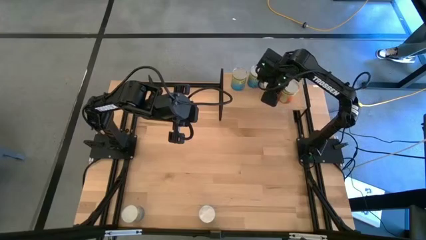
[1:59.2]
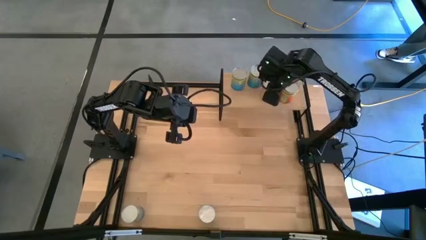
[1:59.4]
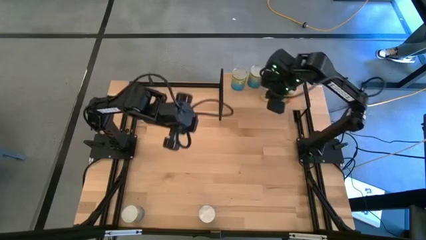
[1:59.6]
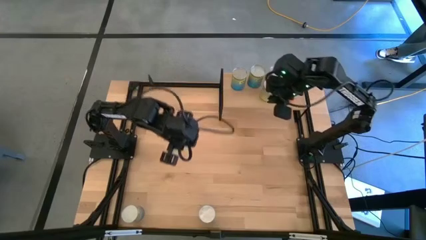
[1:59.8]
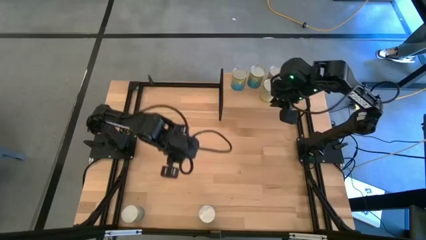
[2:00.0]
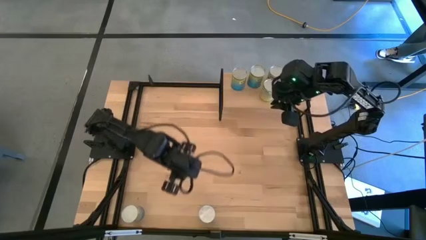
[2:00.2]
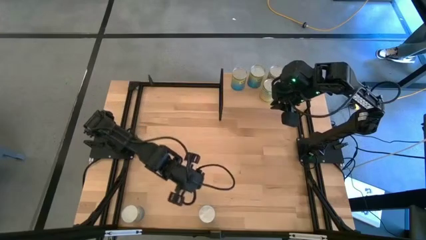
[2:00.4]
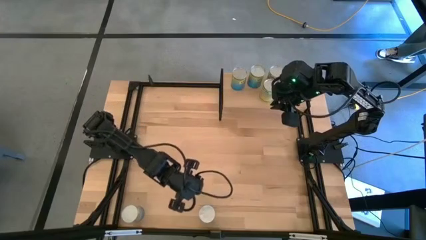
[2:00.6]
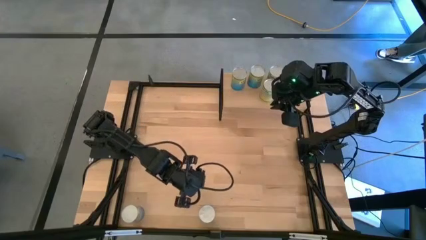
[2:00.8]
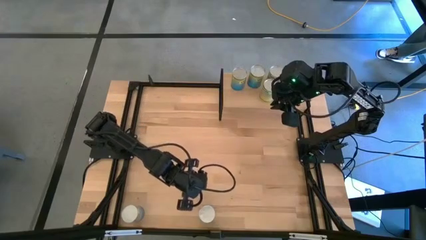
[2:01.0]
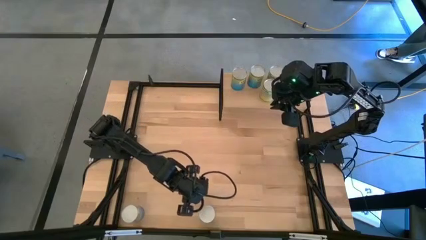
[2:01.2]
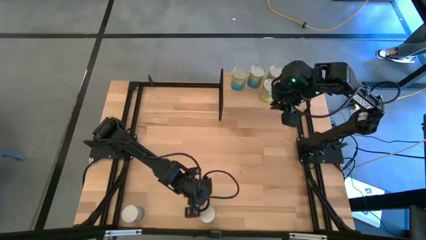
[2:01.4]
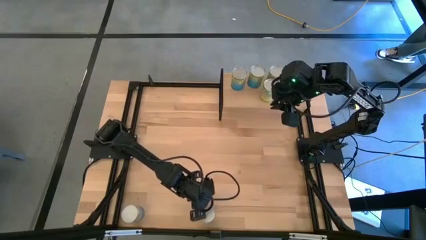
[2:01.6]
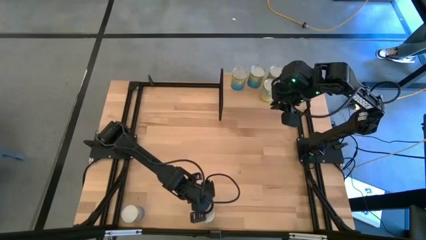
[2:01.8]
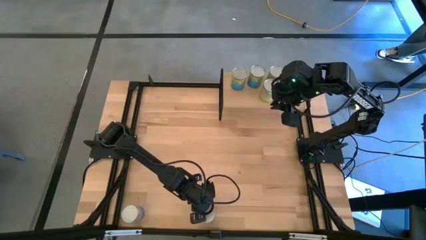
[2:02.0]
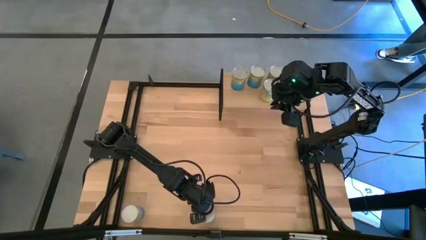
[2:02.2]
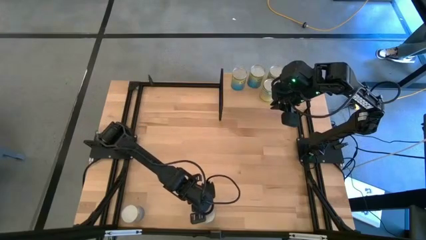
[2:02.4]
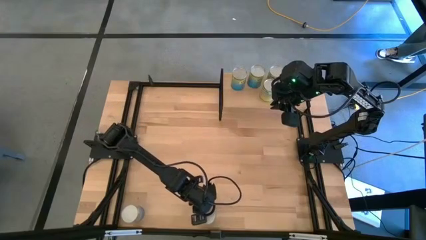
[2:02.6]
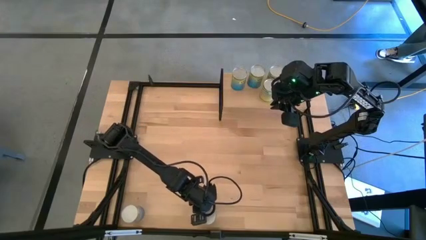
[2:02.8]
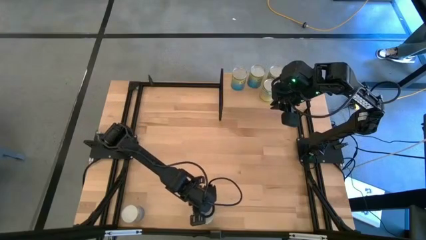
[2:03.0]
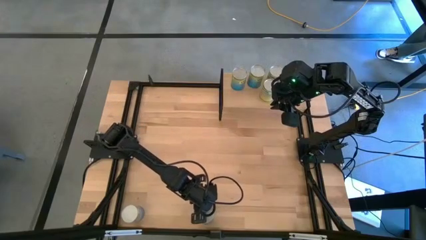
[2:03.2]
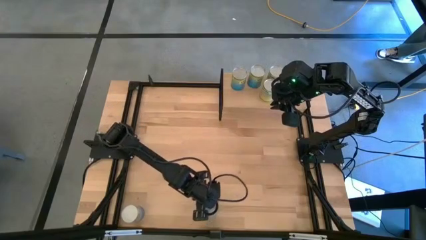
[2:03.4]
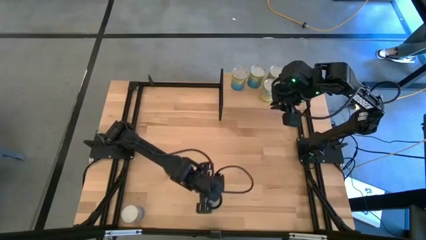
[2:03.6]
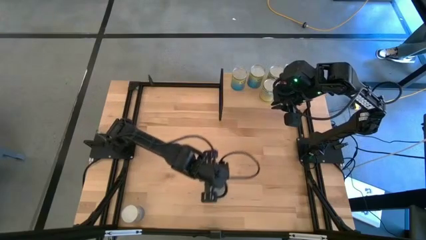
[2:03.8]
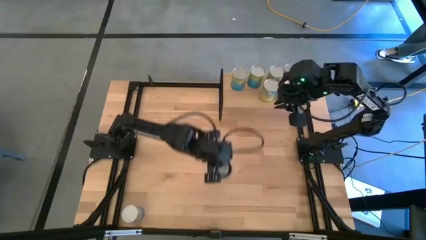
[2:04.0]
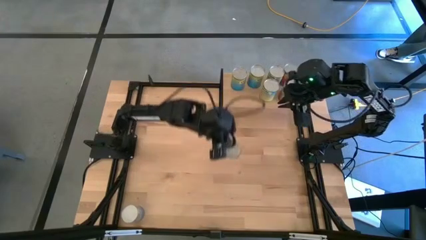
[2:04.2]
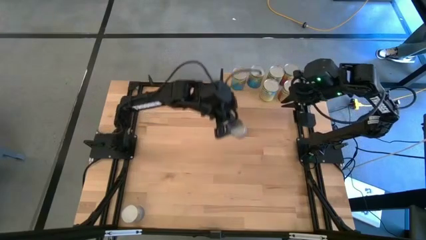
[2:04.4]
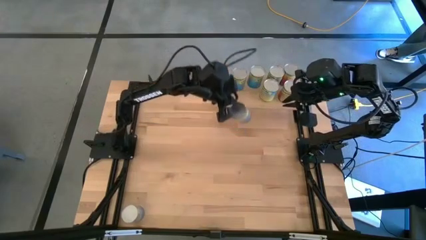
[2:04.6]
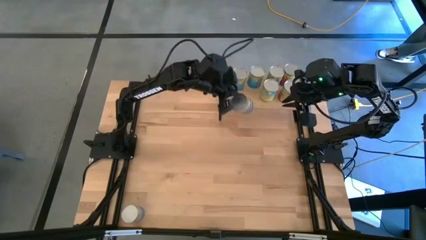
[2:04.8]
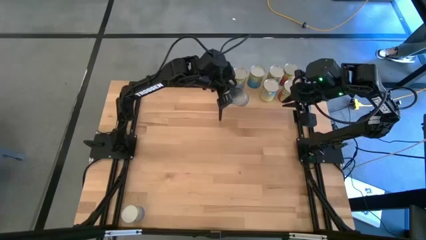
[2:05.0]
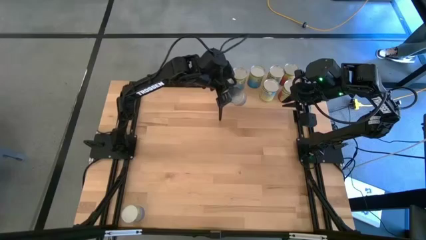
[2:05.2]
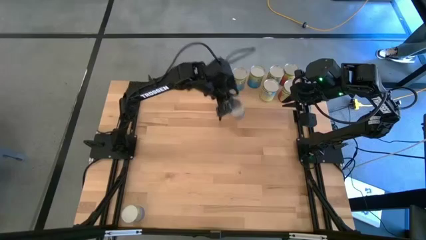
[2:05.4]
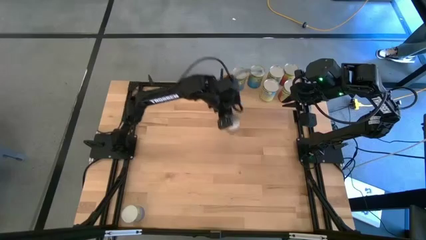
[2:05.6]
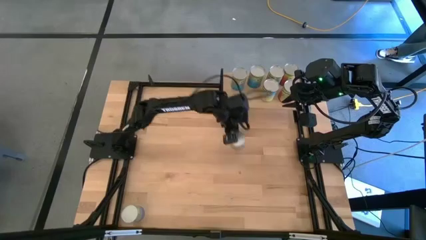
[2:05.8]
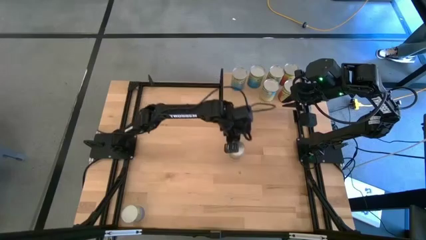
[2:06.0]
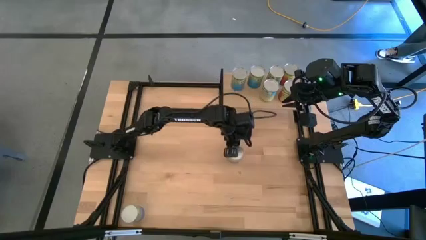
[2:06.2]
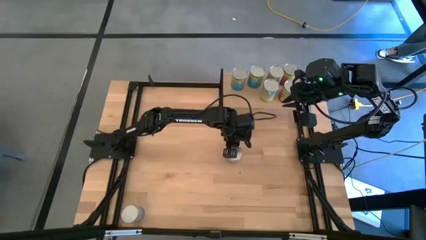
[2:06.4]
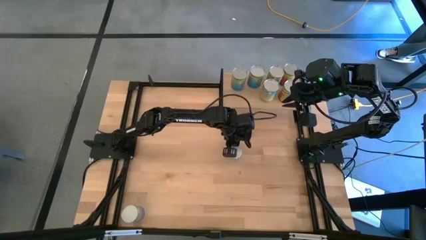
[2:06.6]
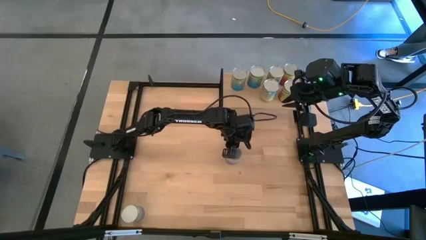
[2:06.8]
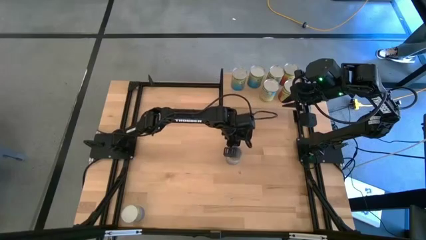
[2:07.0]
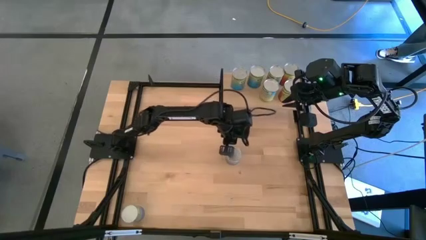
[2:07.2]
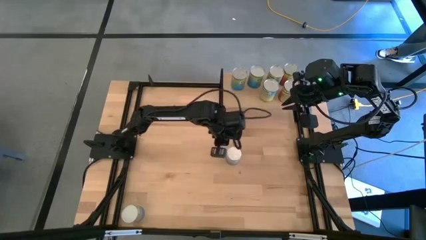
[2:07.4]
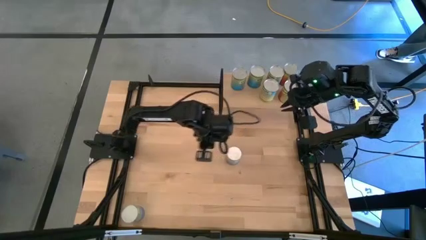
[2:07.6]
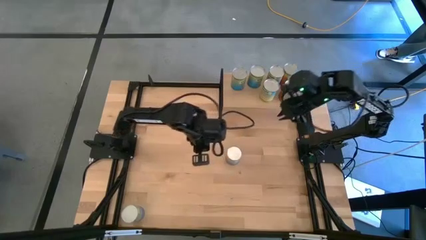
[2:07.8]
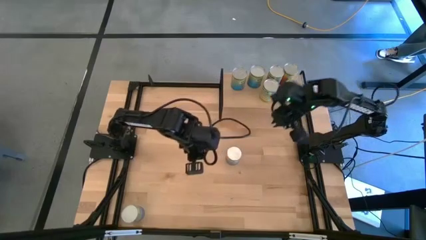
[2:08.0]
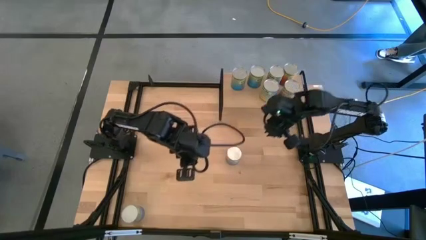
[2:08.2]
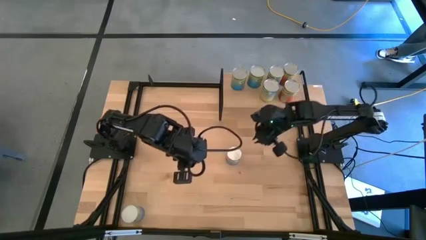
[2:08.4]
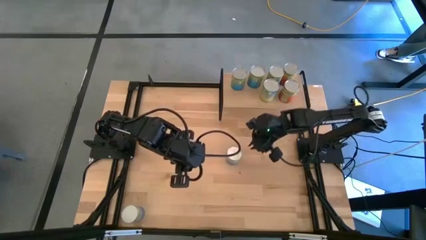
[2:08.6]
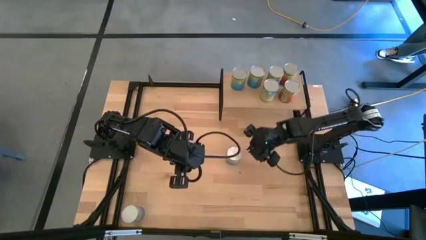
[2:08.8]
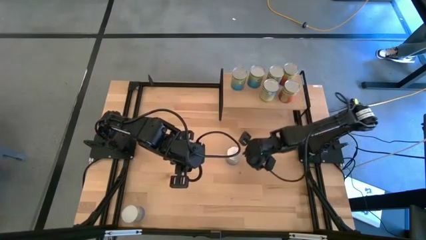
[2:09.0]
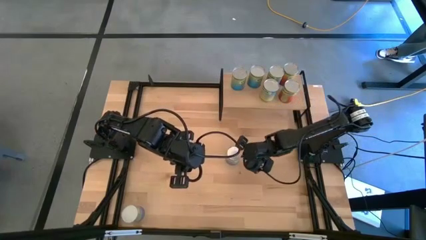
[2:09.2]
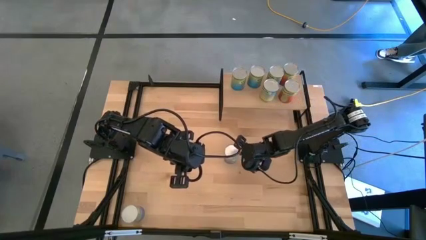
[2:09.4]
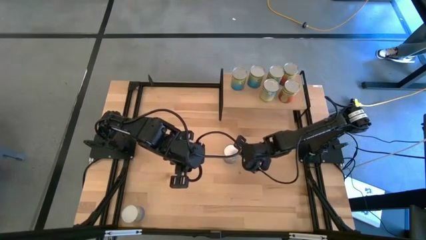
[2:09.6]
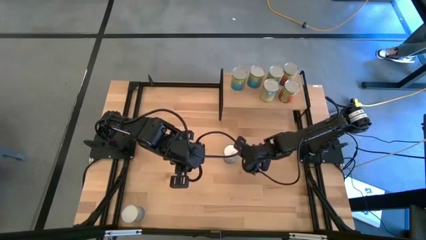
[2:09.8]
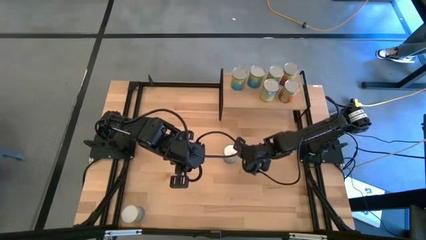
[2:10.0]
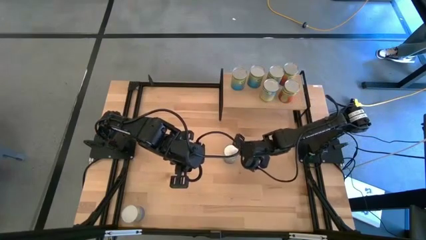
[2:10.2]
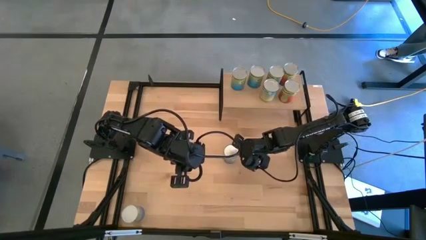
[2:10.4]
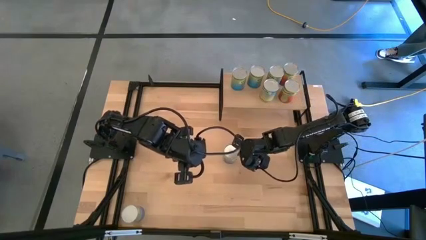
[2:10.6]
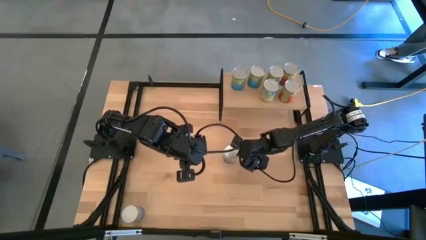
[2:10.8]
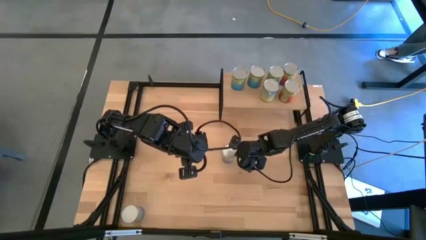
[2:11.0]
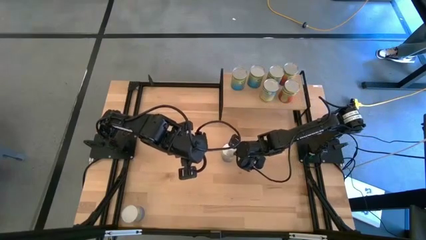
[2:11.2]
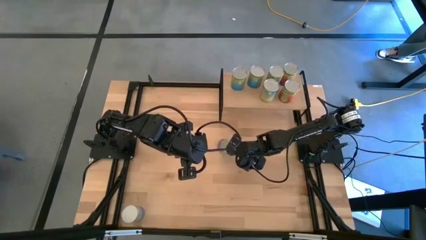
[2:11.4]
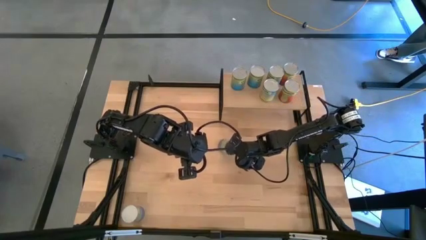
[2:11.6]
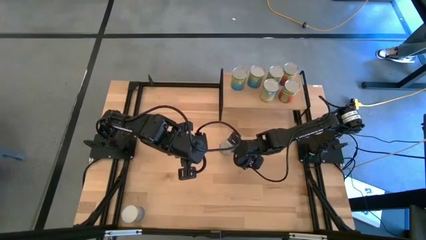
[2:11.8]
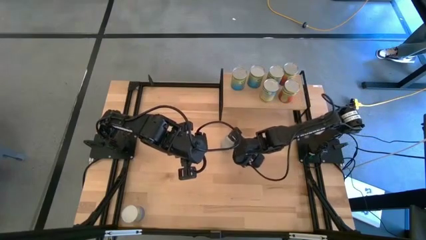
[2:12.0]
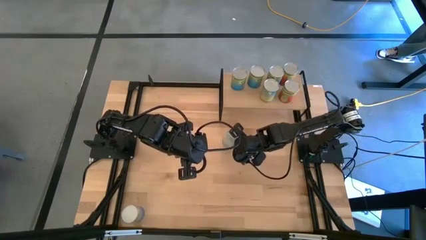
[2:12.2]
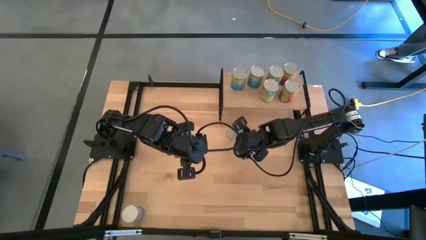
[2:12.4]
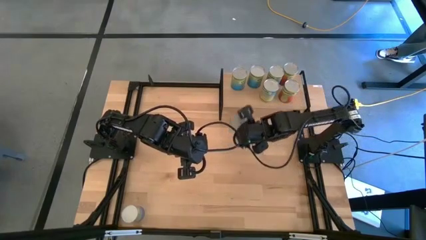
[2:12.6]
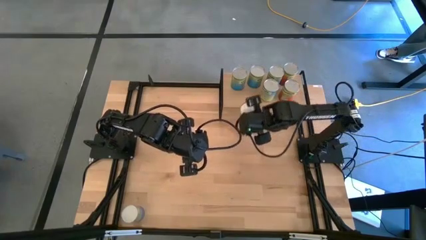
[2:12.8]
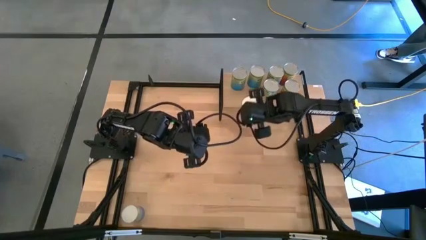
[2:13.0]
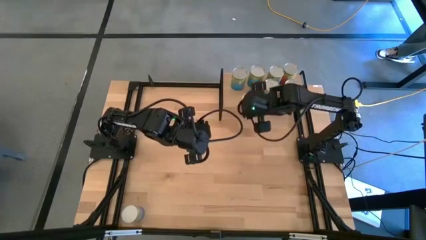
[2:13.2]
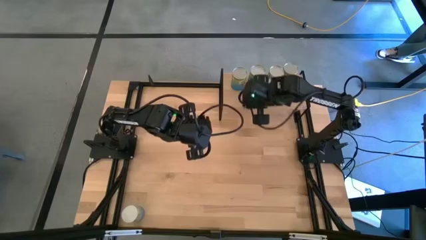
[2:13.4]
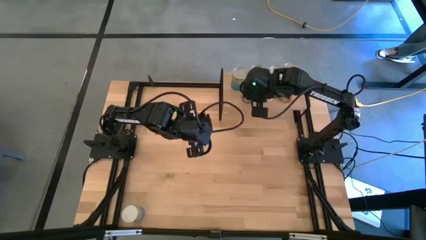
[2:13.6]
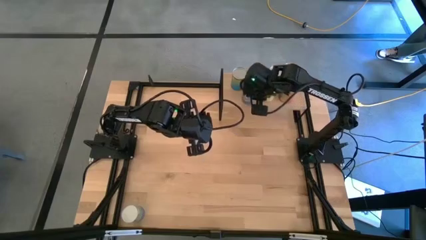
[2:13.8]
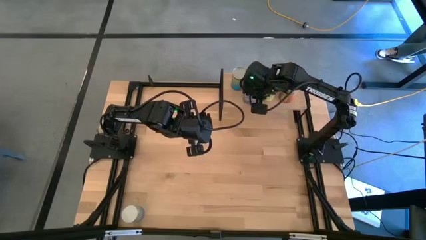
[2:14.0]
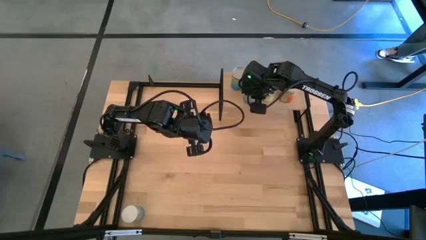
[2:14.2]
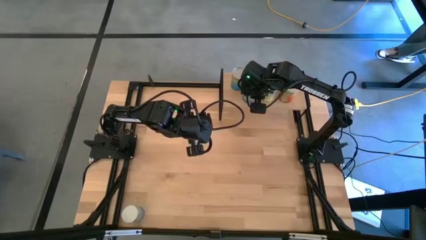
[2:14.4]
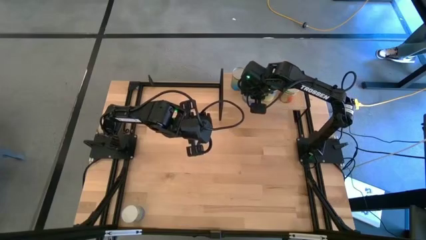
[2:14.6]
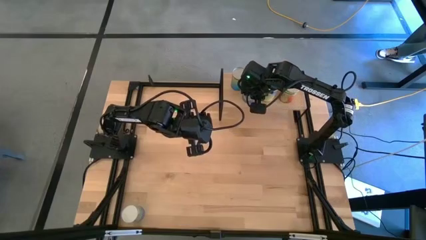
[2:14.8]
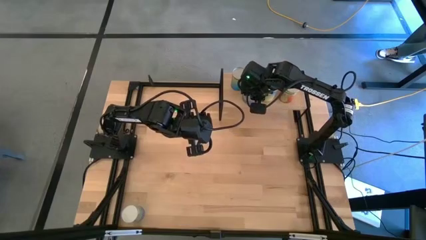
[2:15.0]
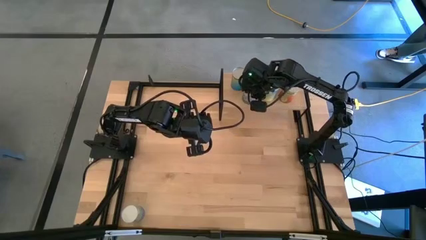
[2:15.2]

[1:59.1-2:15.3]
Task: Pick and place cans onto a shelf
Put the right canned peas on the shelf

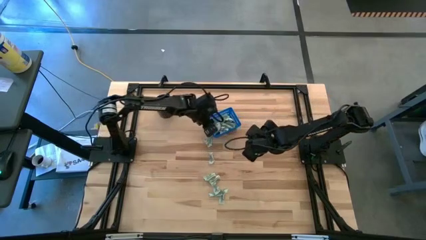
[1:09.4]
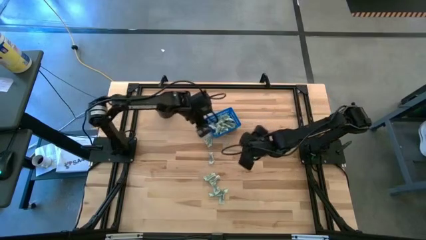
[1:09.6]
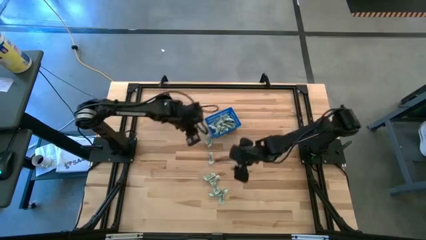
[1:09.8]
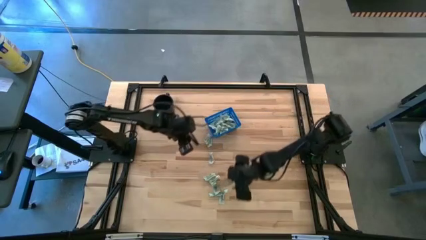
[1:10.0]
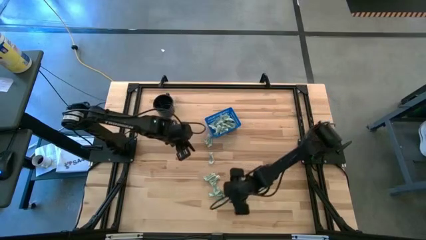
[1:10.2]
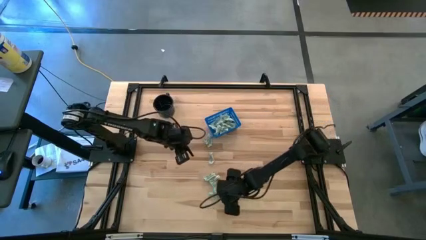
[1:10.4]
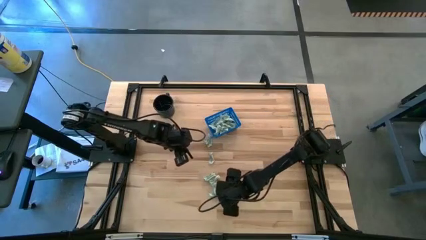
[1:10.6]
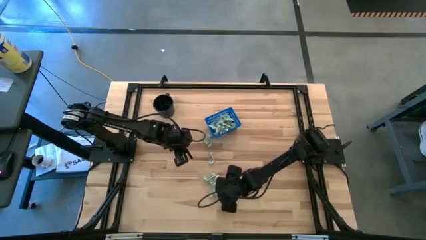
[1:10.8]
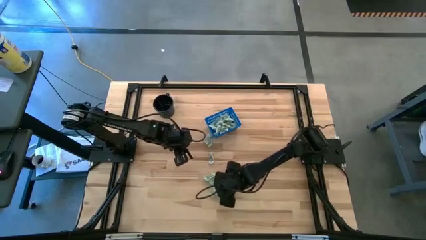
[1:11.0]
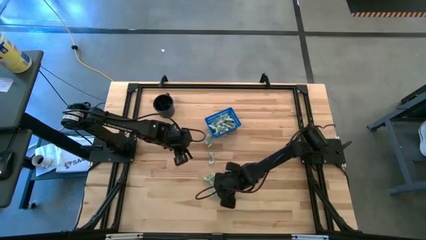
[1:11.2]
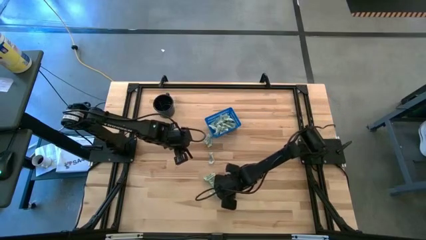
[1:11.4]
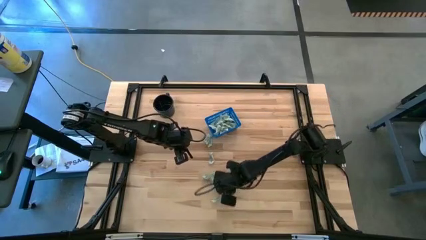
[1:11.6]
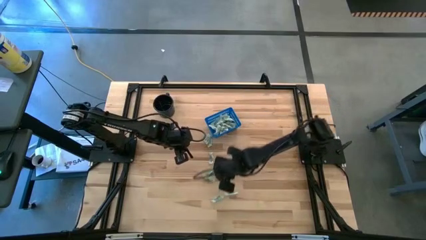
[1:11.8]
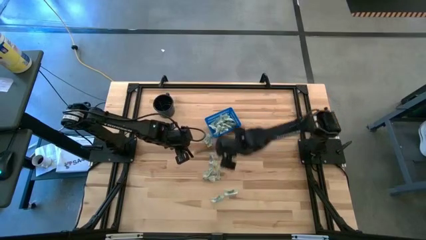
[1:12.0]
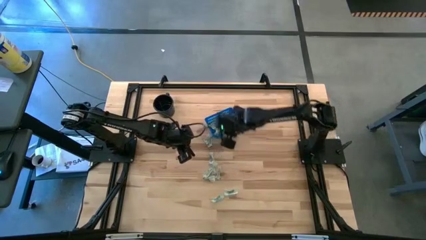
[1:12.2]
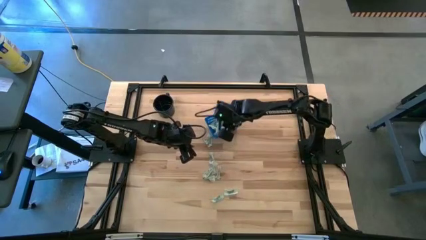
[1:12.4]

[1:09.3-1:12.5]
Task: Pick and place Stevia / Truvia into bins
Put the green stevia packet into the blue bin
